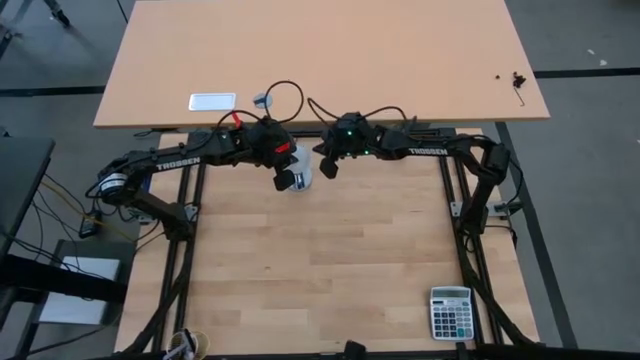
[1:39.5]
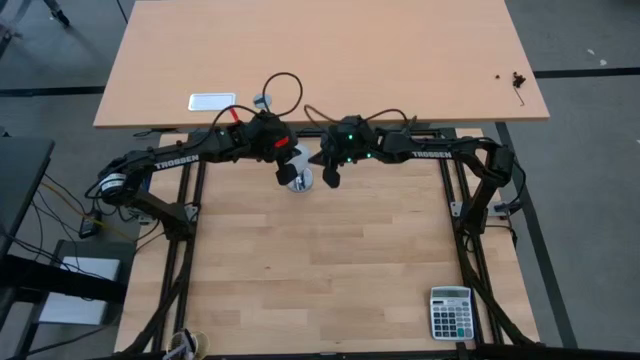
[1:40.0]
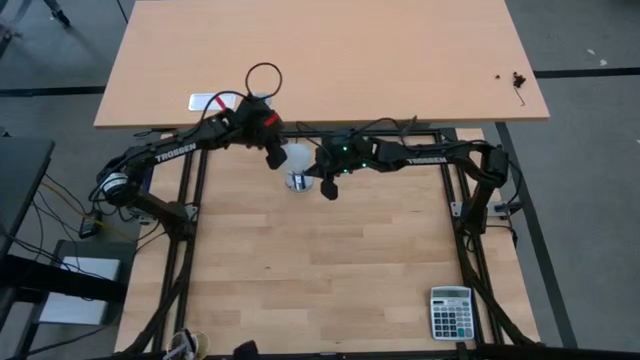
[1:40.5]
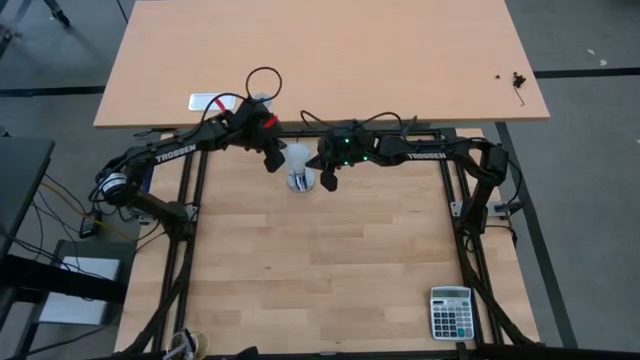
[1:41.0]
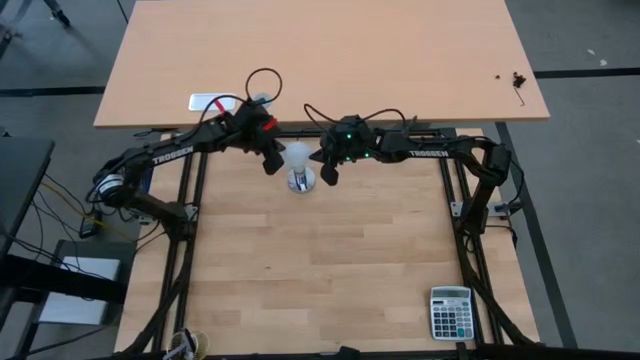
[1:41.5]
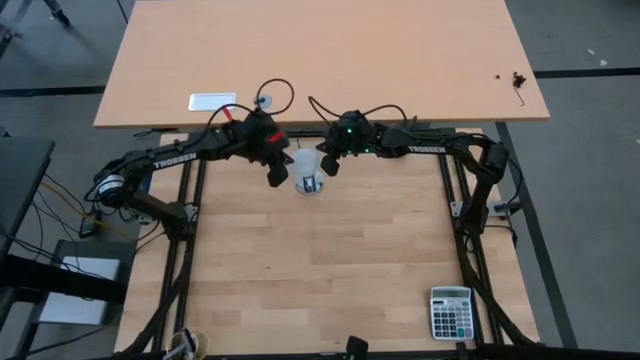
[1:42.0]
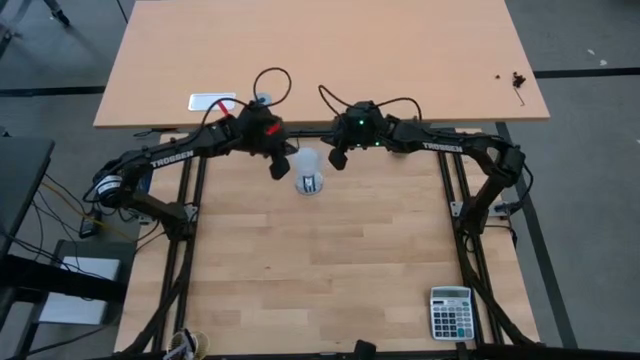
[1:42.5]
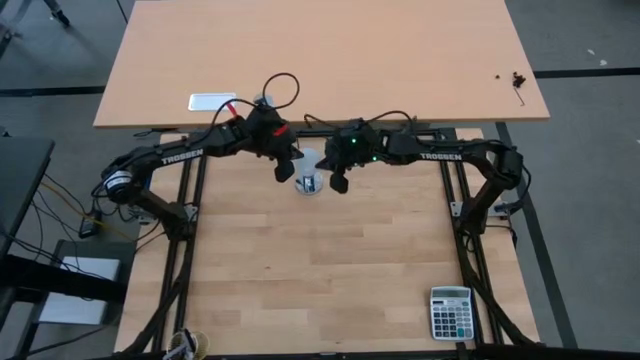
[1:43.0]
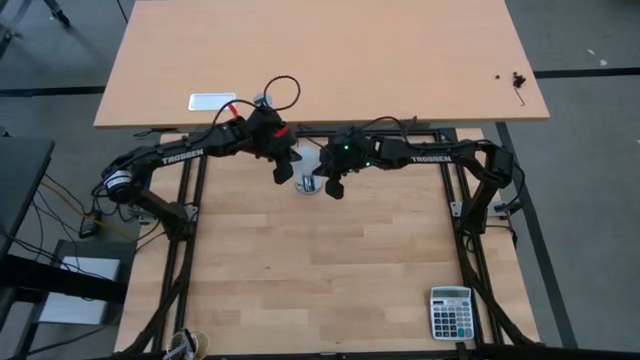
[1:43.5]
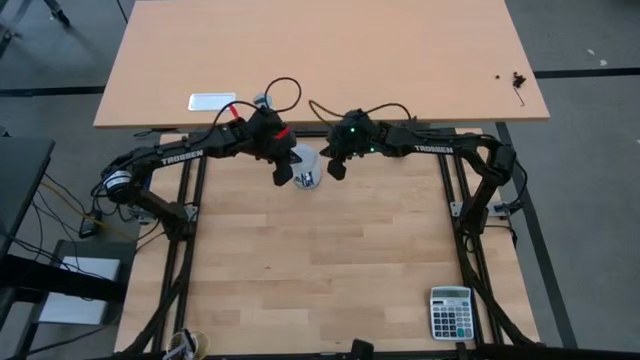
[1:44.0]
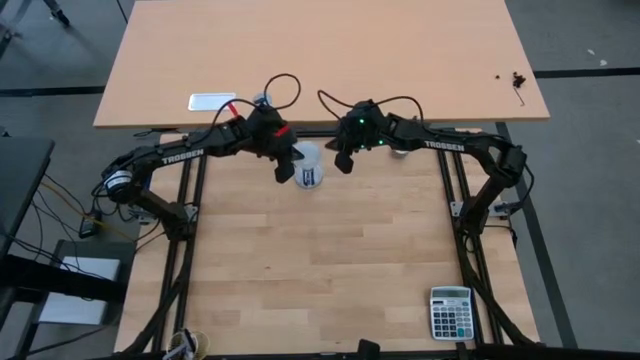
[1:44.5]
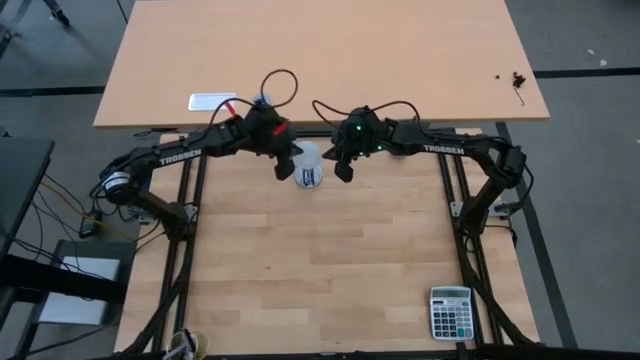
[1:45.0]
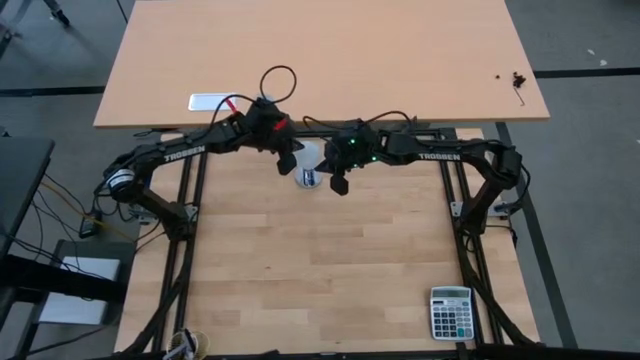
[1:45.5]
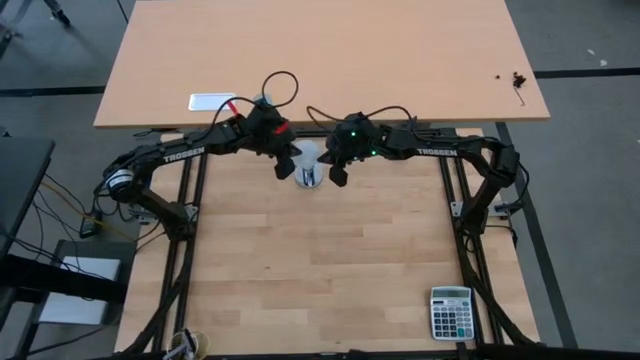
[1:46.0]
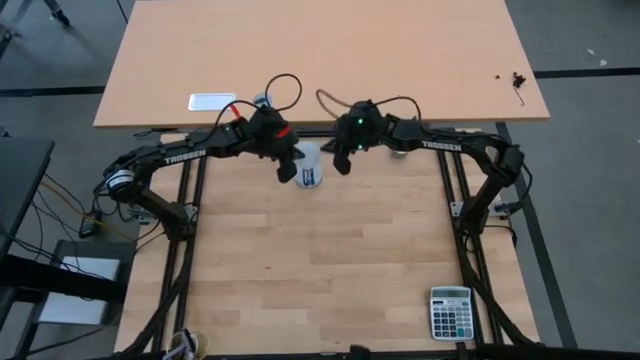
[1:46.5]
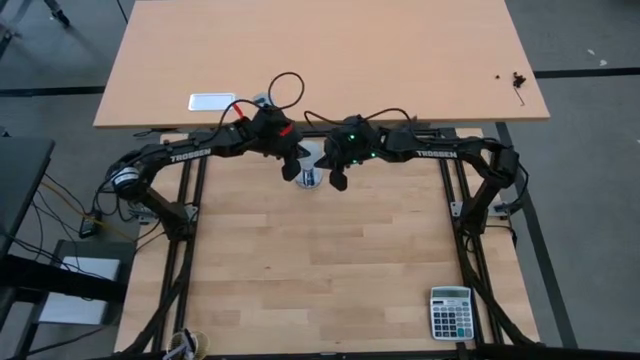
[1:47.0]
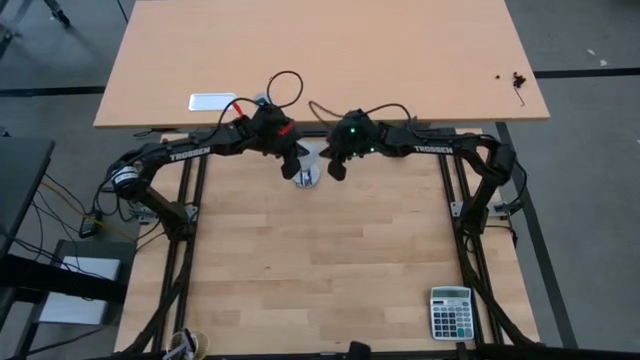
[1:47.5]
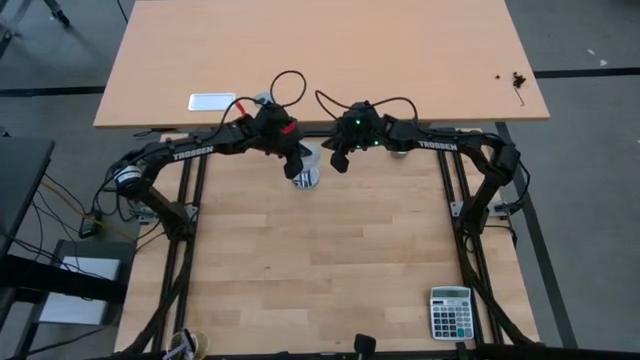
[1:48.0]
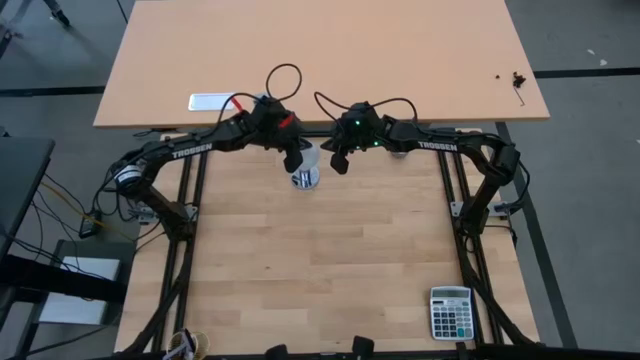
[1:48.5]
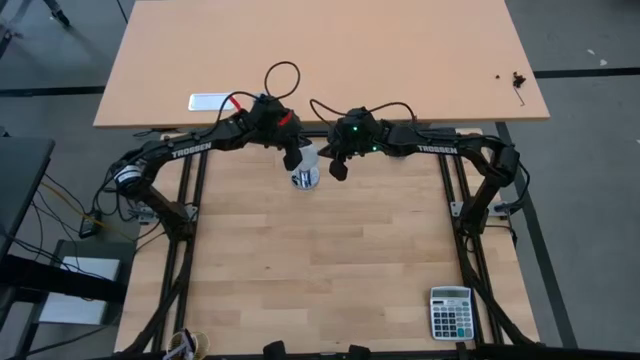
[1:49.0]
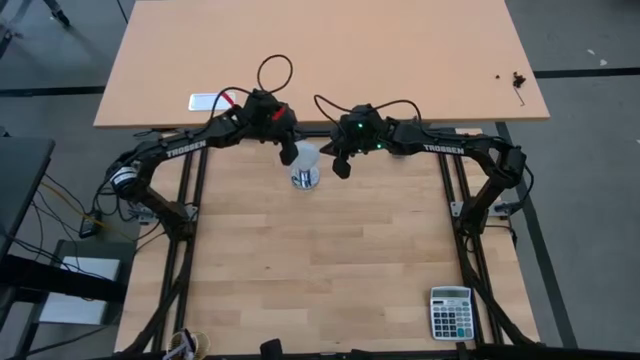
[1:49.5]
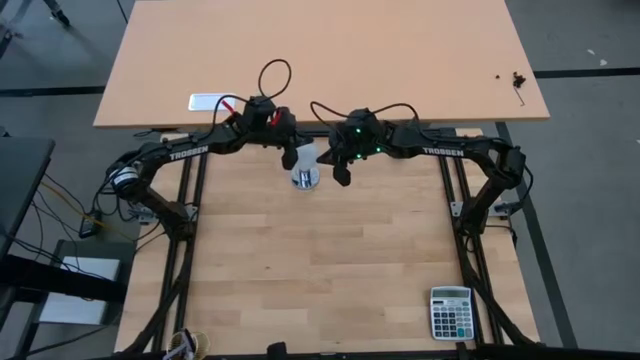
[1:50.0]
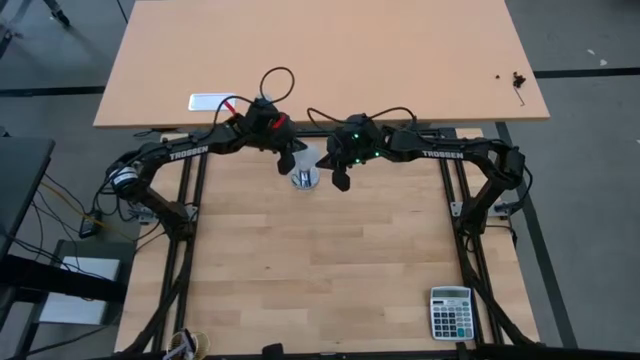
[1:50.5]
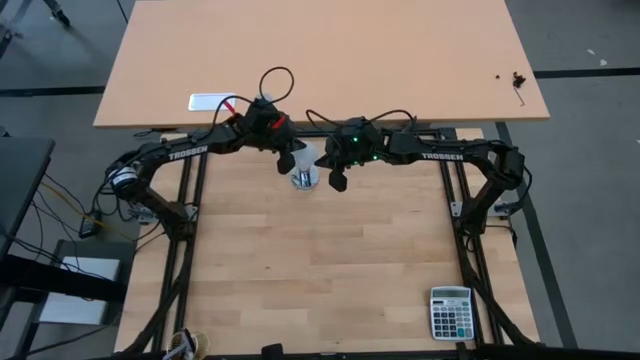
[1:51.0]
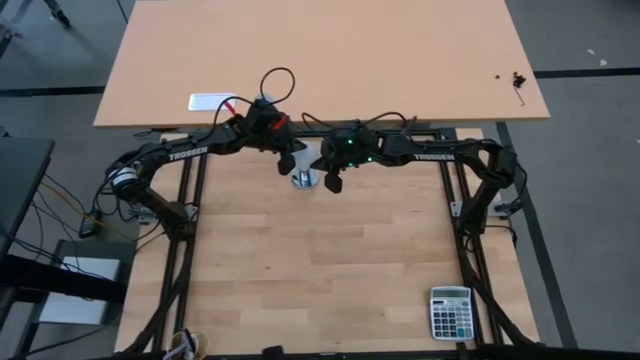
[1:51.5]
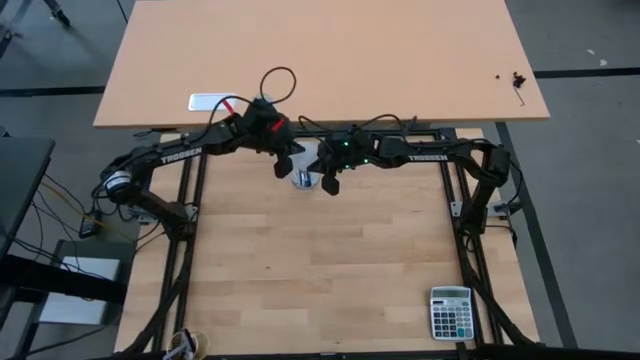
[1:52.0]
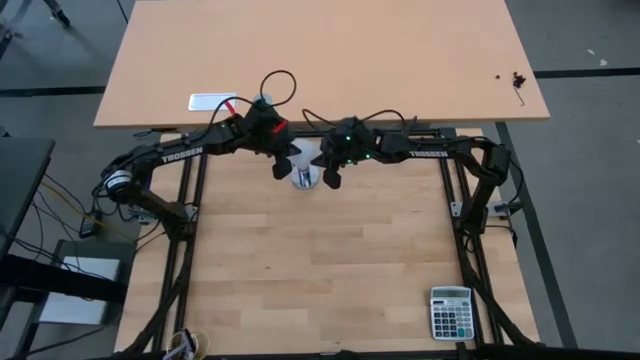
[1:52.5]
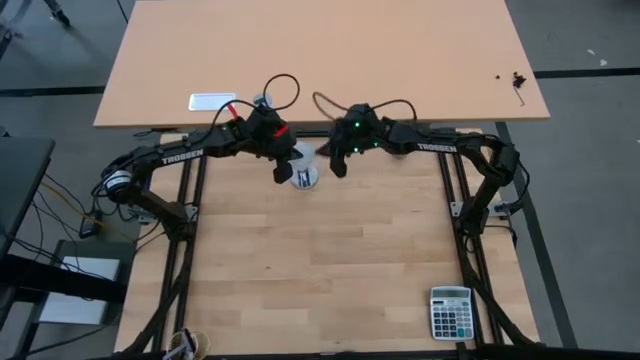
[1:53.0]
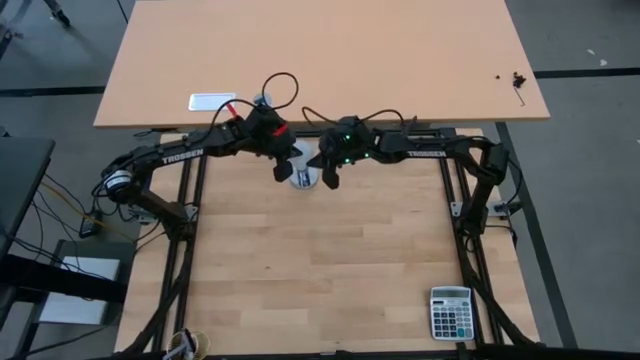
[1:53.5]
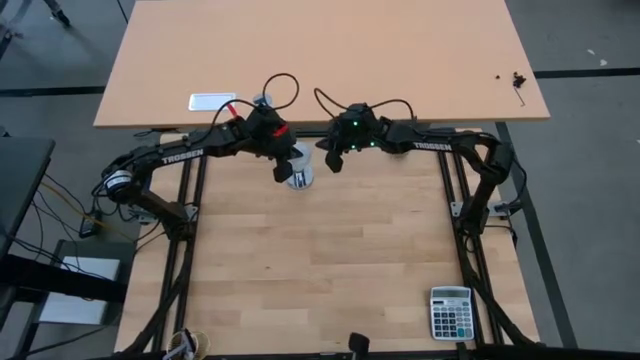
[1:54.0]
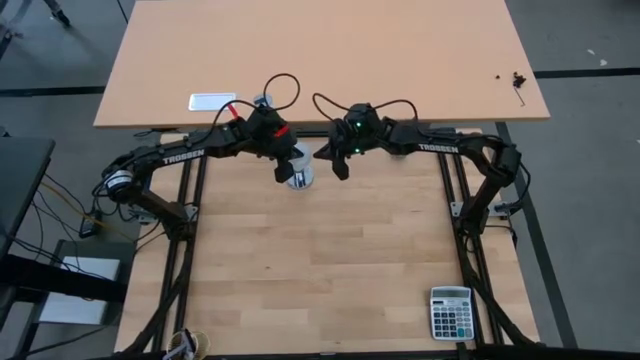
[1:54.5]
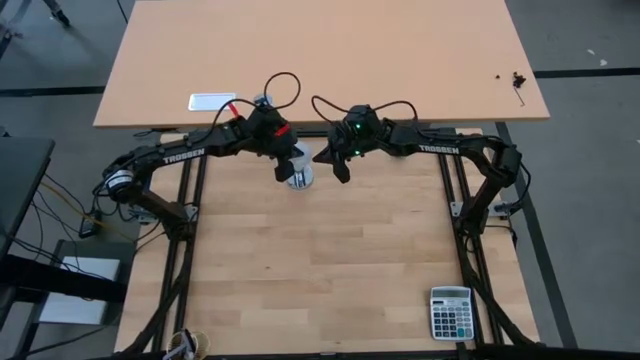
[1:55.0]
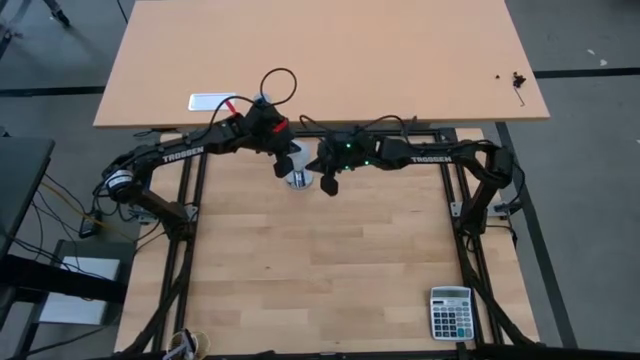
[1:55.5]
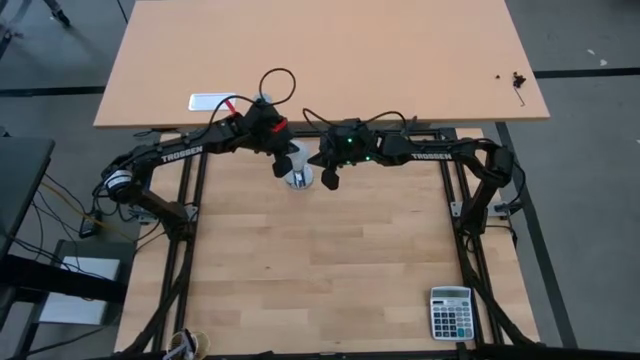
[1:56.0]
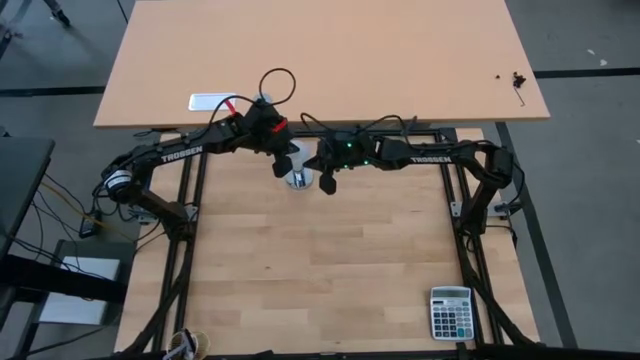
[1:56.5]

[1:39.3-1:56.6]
Task: Screw lightbulb
Remove the bulb from the lamp socket
